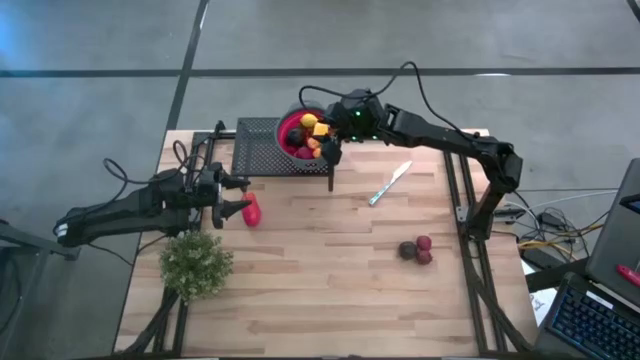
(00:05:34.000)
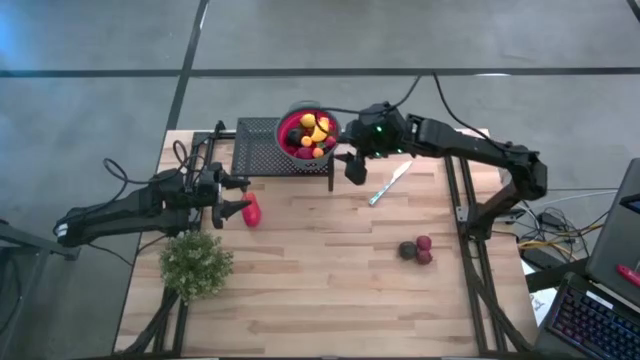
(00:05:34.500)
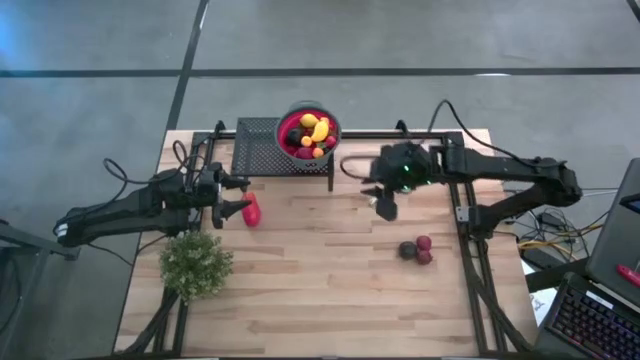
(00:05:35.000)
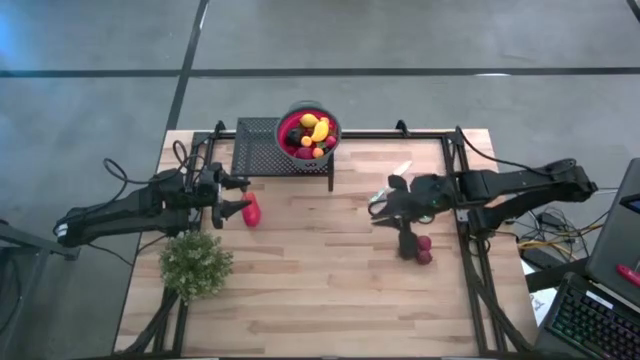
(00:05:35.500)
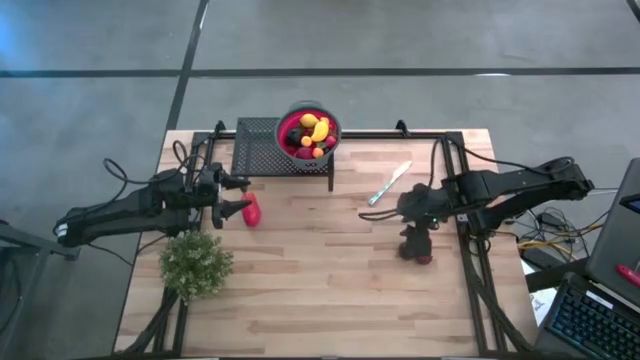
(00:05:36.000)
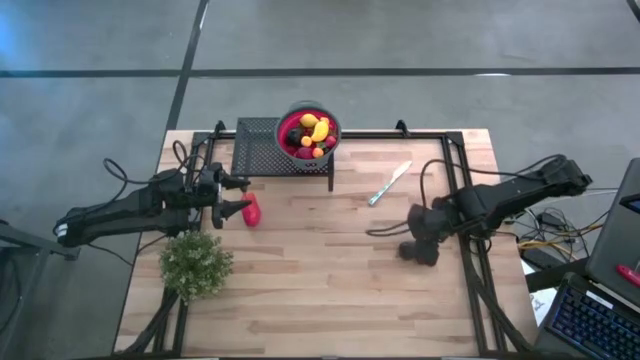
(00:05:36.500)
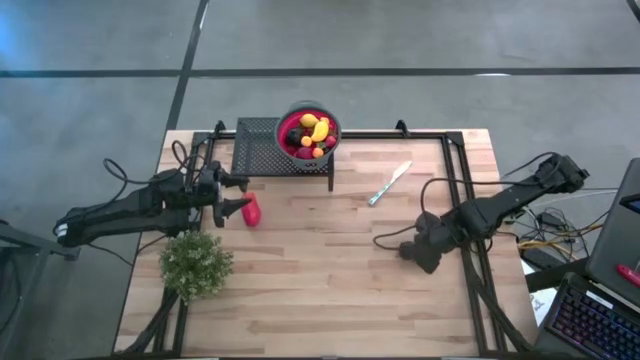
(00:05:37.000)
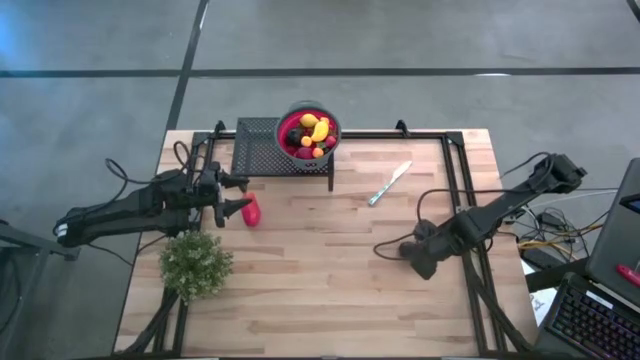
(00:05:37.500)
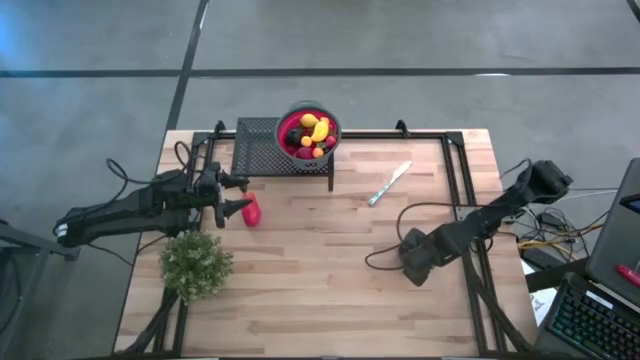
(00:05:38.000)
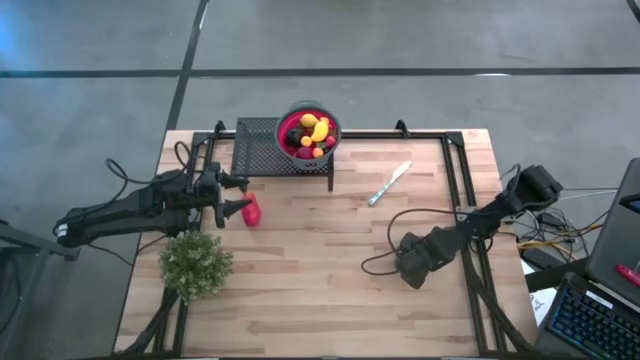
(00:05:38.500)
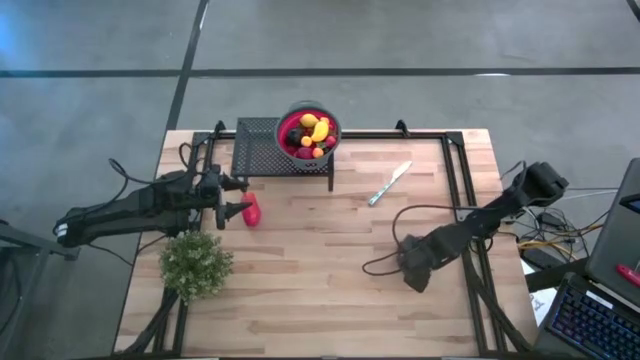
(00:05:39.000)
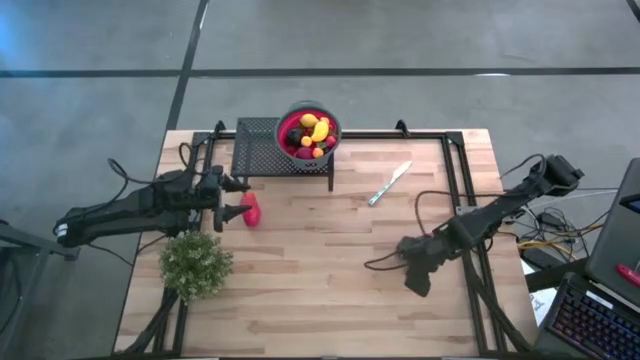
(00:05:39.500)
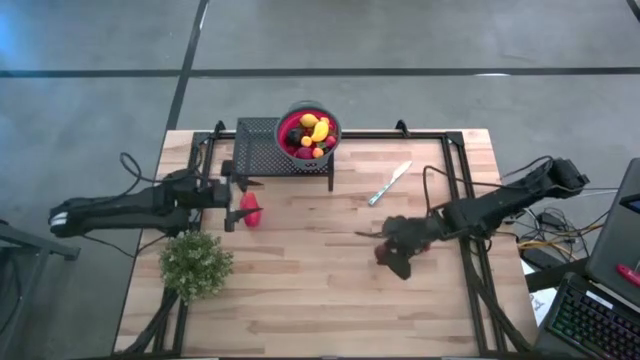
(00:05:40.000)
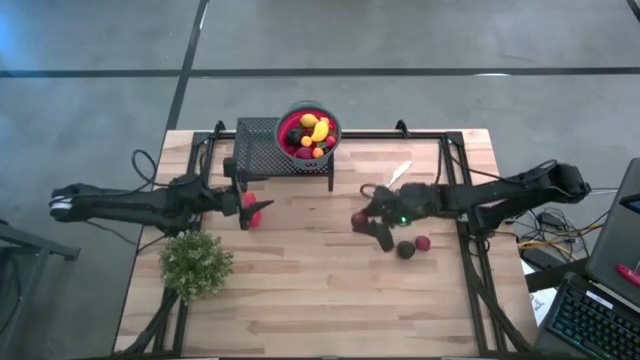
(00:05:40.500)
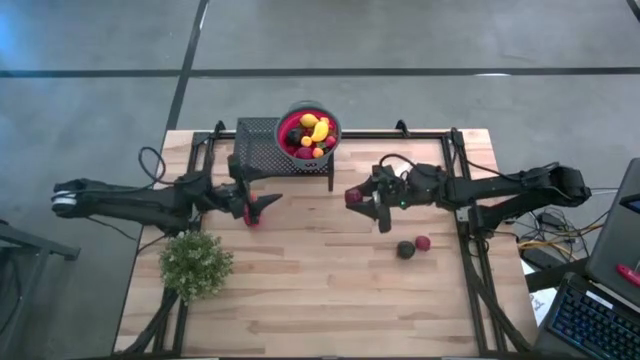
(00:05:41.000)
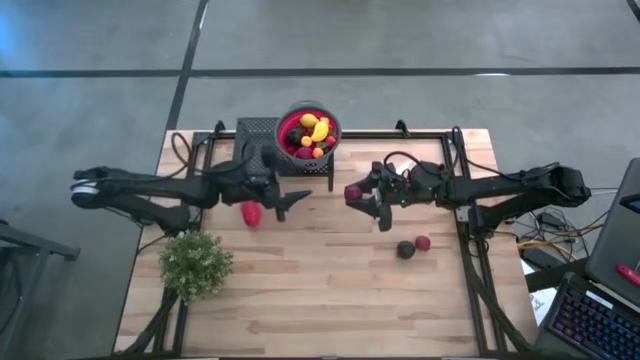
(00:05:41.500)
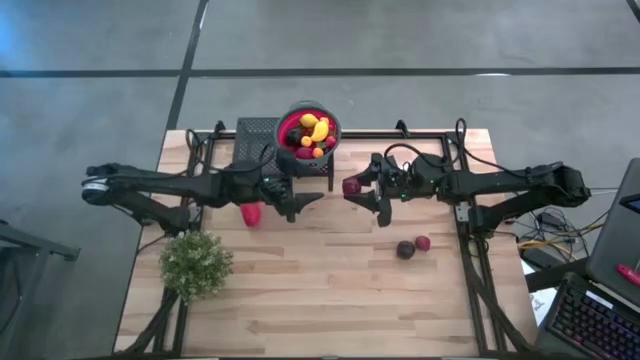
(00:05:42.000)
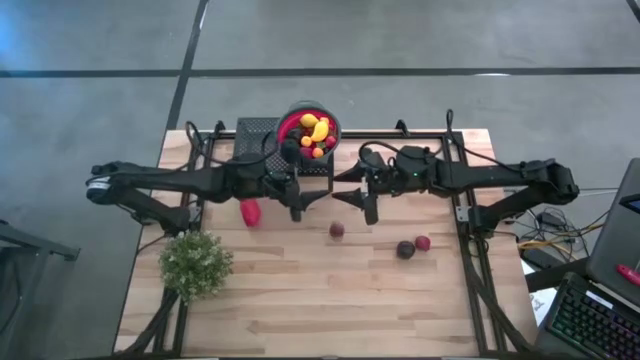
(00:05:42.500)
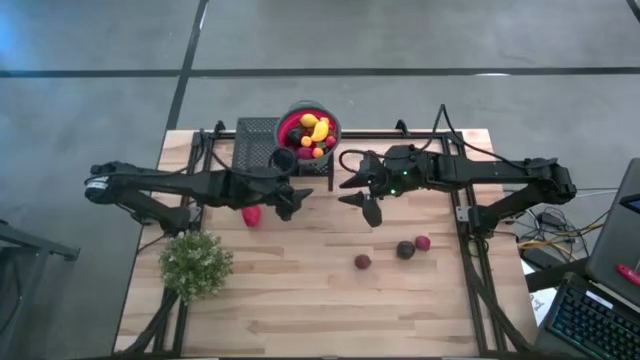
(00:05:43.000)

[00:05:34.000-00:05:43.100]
Task: Pick & Place Fruit
Put the red pomegranate into the red gray strainer bowl on the shelf

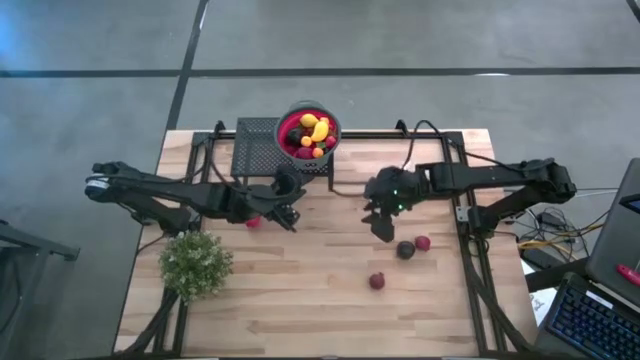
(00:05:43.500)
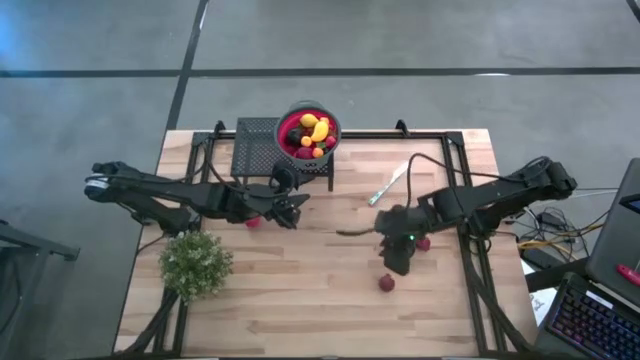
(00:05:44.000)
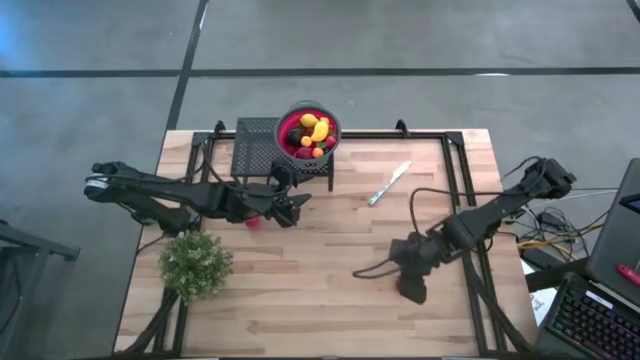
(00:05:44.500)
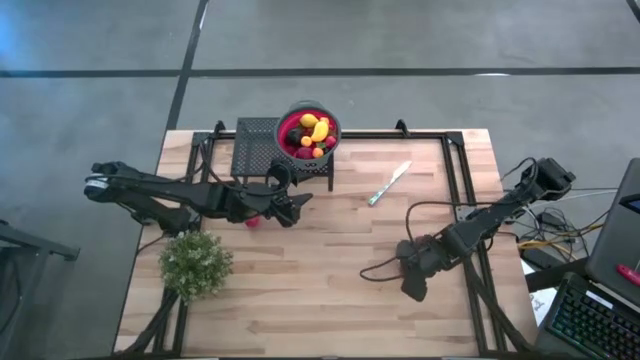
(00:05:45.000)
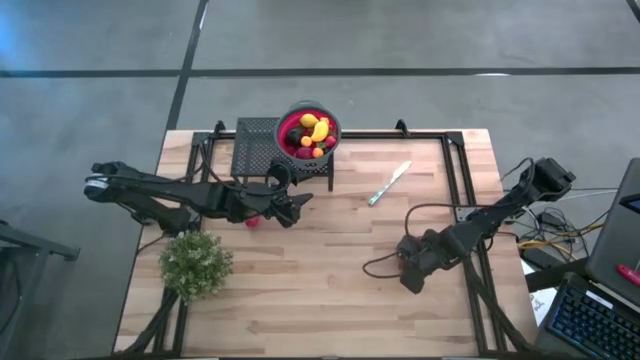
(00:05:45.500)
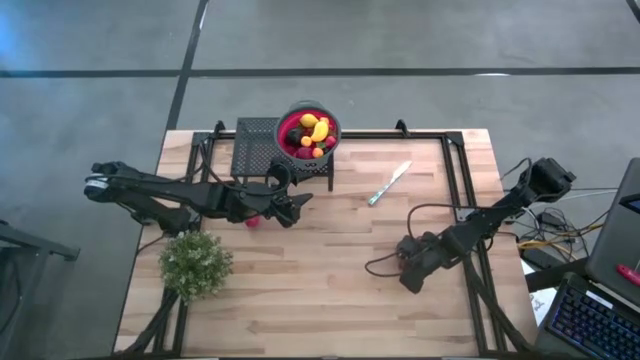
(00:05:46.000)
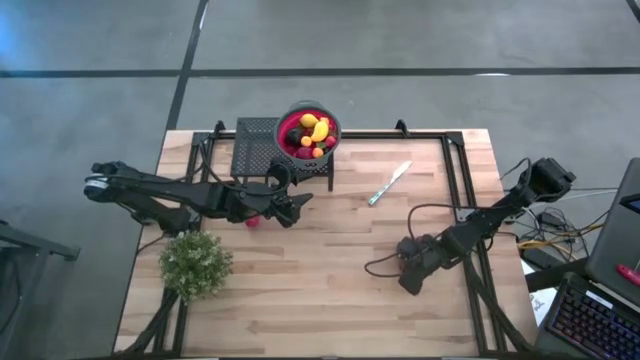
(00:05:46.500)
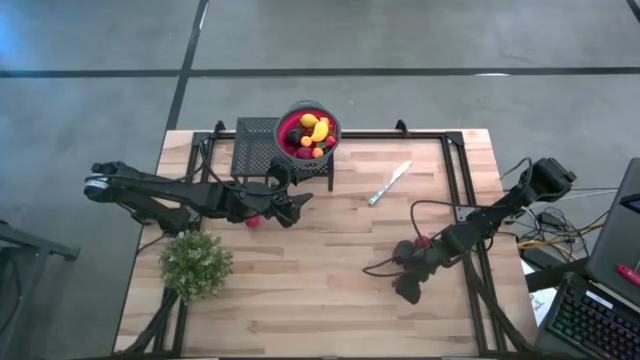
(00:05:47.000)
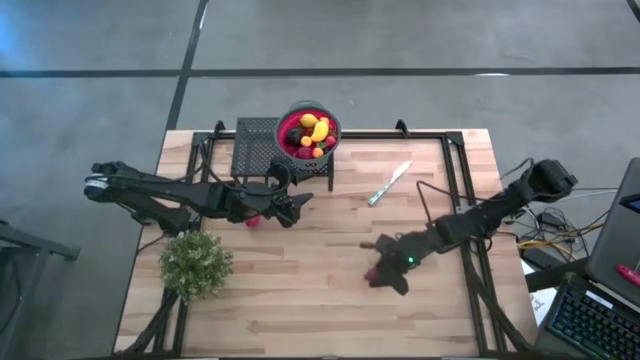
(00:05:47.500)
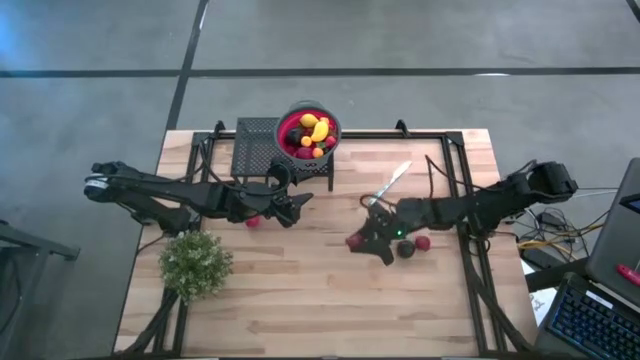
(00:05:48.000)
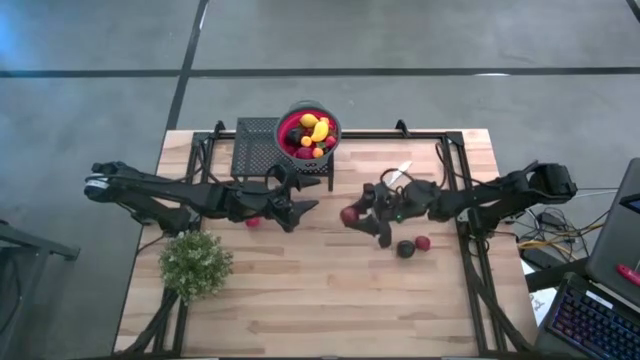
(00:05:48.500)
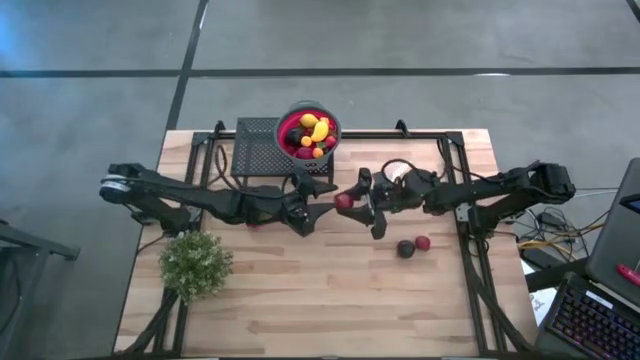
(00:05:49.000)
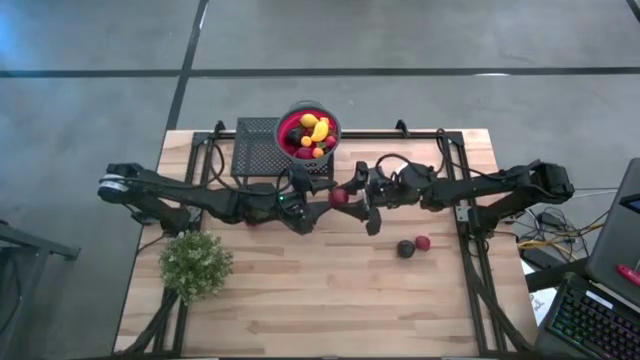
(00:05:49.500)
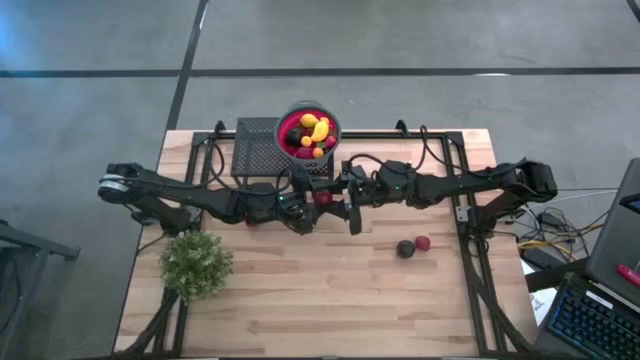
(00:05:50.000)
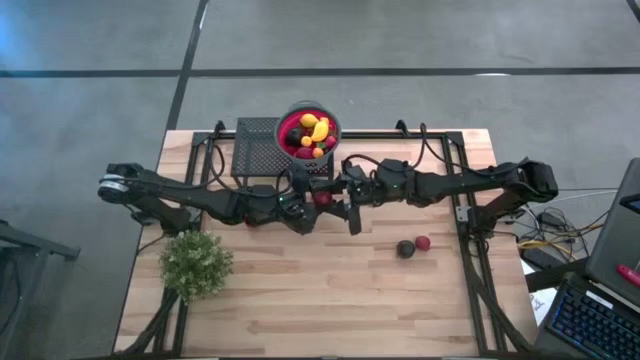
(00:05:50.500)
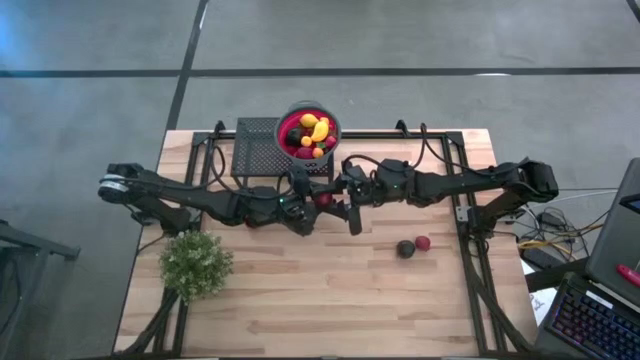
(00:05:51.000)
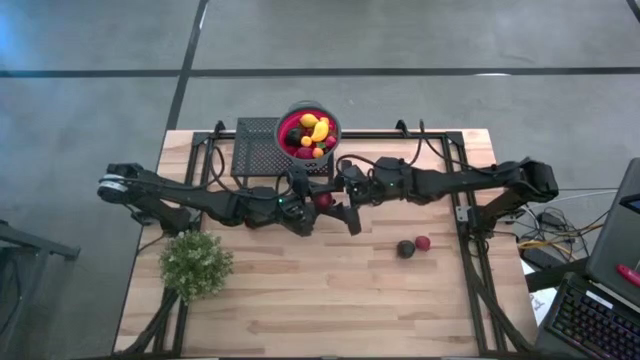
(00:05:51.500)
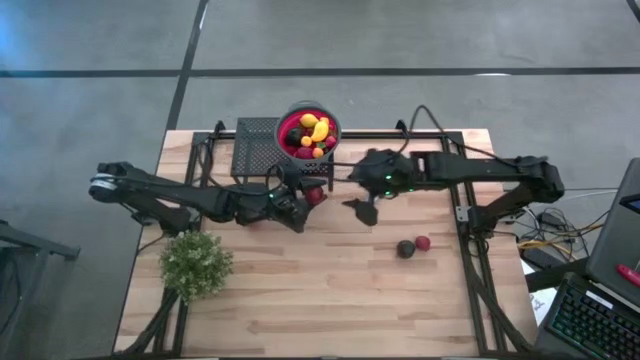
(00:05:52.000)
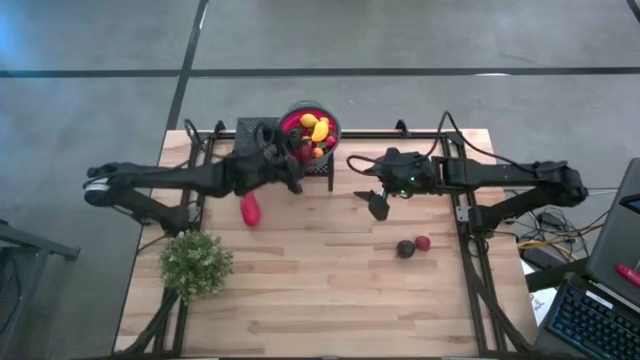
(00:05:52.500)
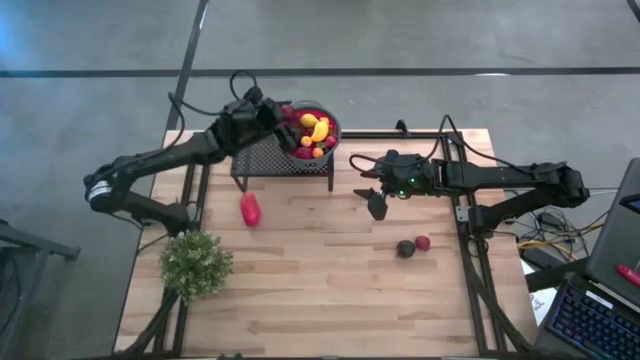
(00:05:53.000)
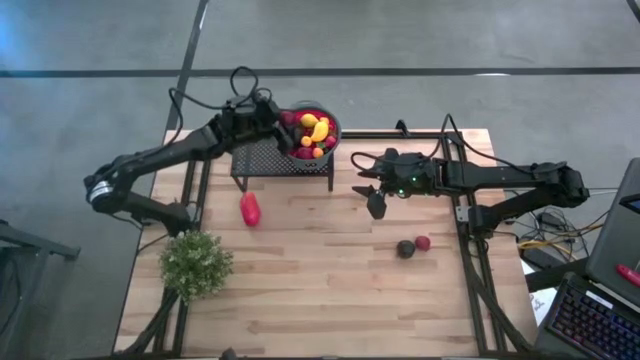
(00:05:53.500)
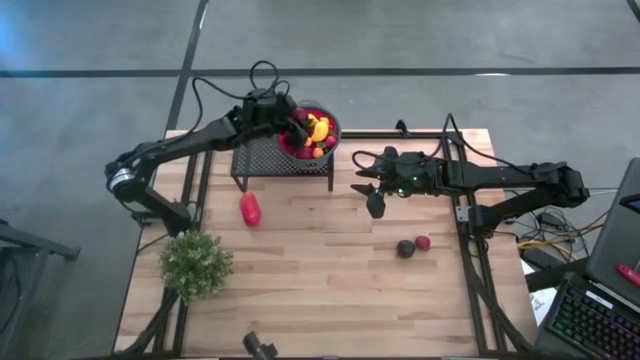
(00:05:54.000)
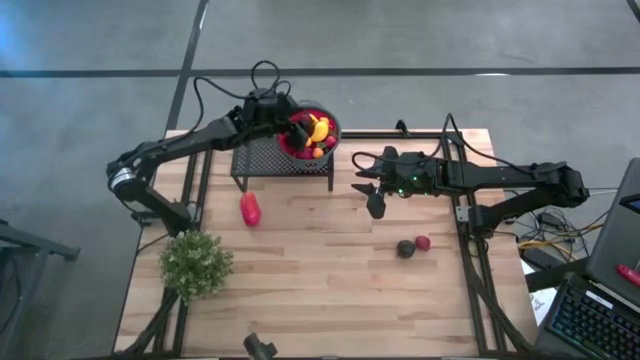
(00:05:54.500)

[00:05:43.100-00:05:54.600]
Put the red pomegranate into the red gray strainer bowl on the shelf
